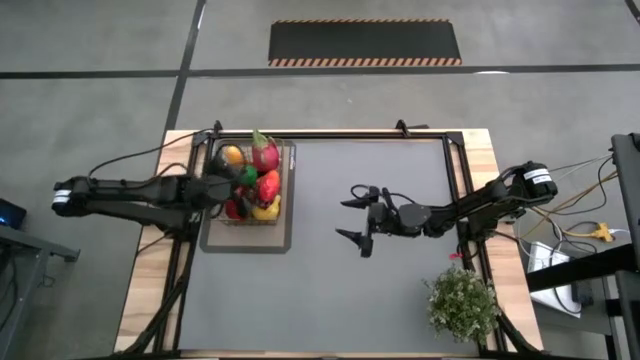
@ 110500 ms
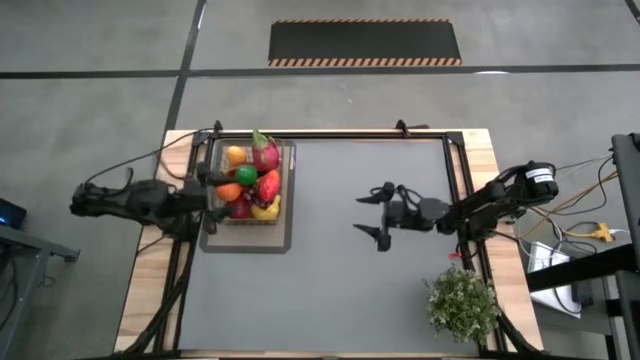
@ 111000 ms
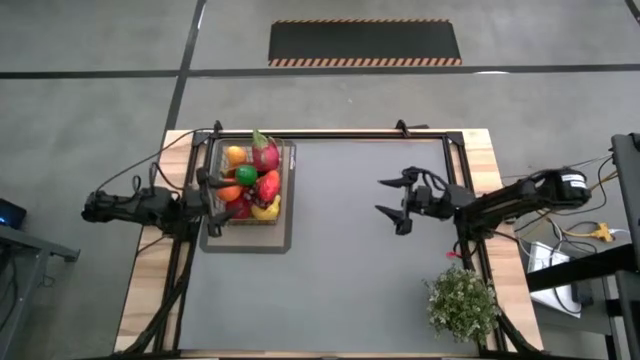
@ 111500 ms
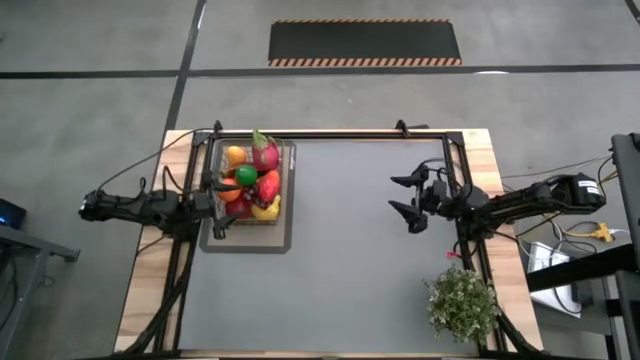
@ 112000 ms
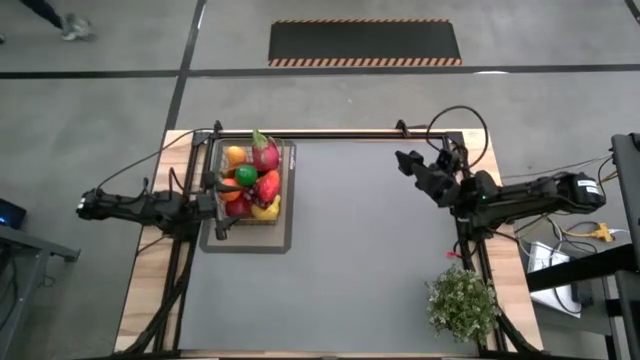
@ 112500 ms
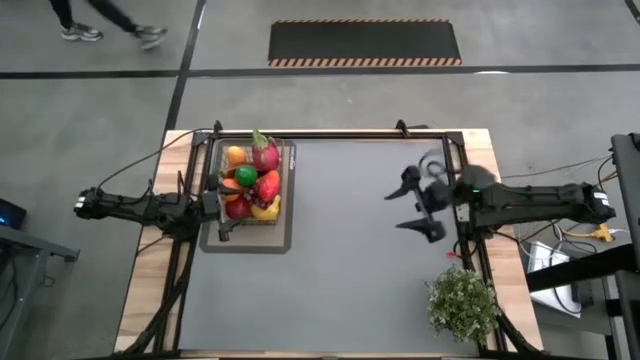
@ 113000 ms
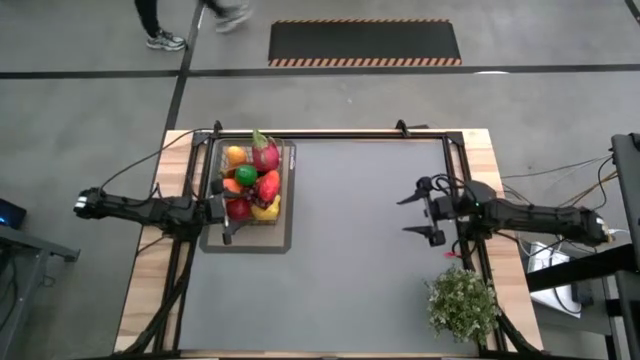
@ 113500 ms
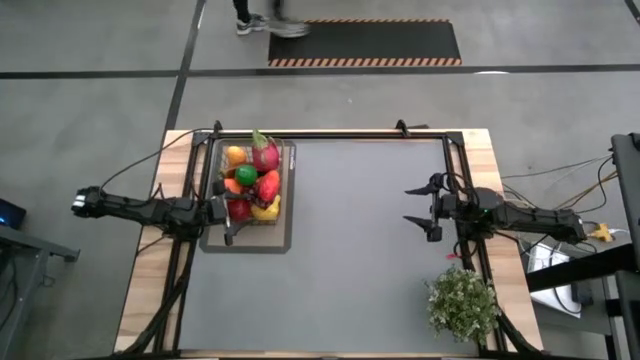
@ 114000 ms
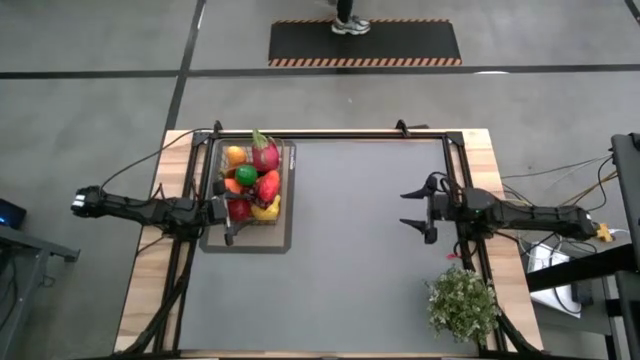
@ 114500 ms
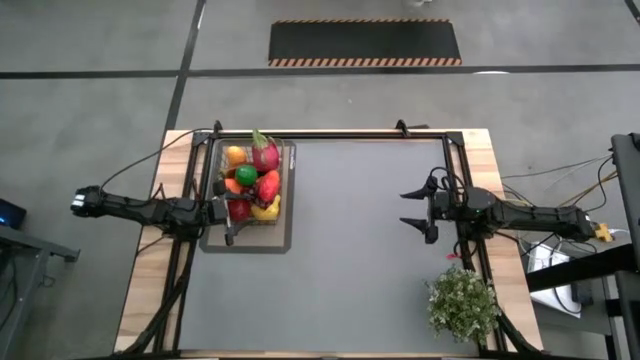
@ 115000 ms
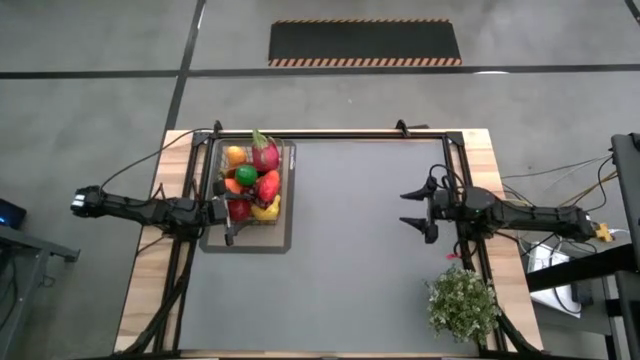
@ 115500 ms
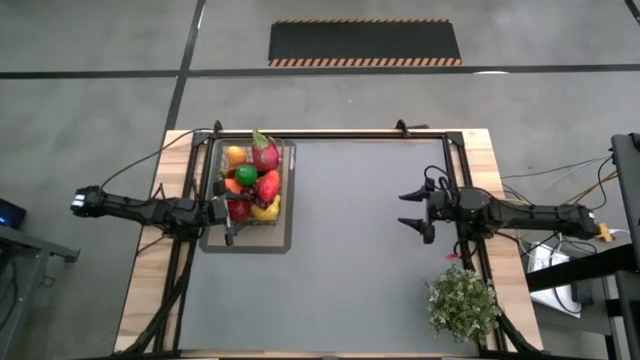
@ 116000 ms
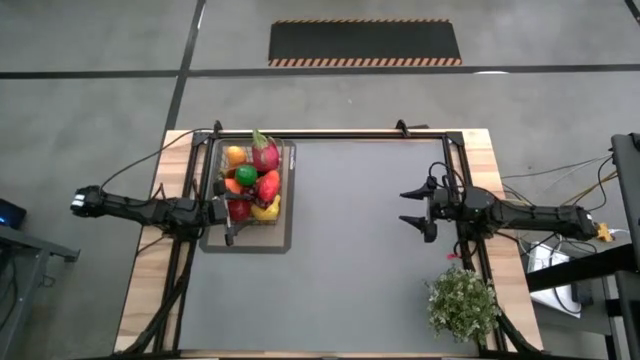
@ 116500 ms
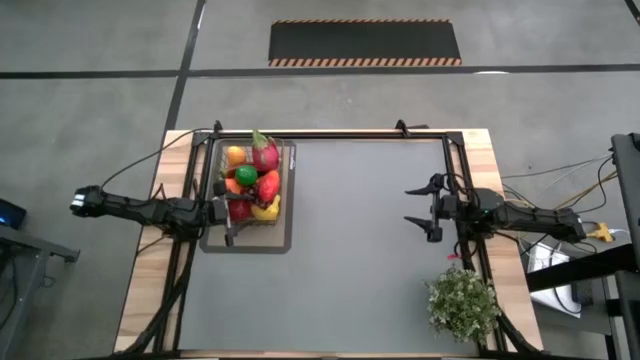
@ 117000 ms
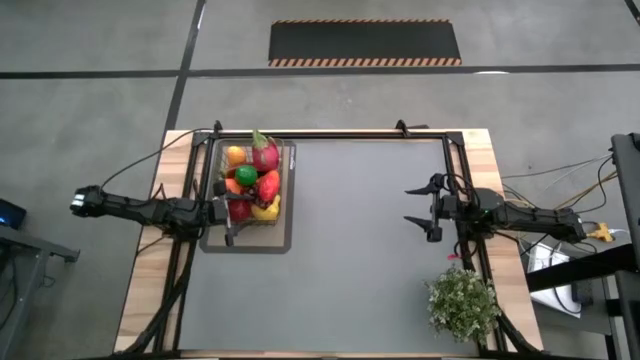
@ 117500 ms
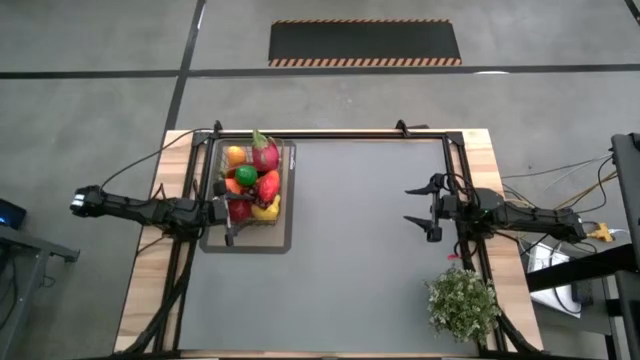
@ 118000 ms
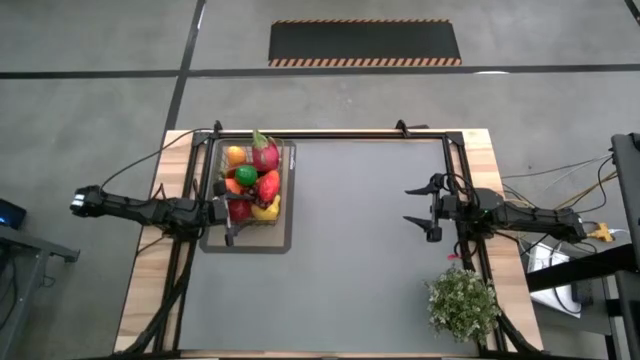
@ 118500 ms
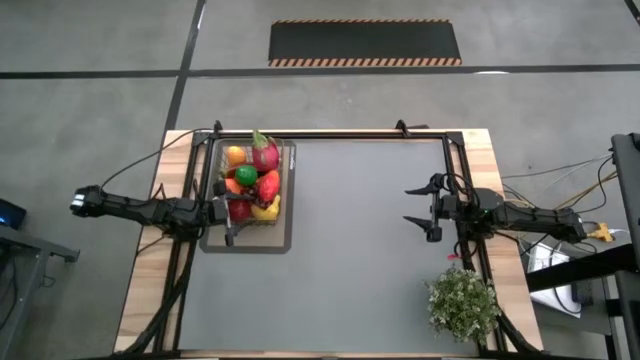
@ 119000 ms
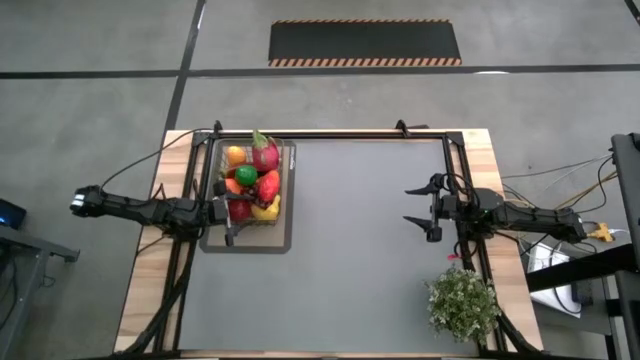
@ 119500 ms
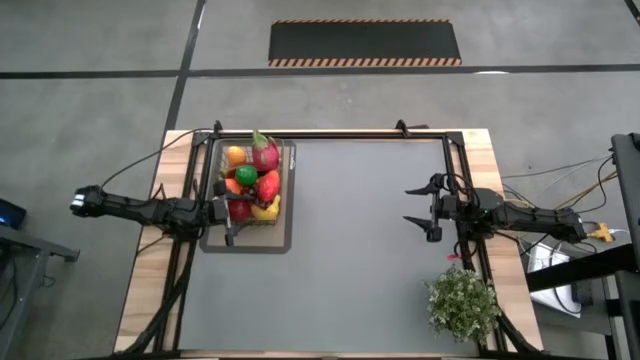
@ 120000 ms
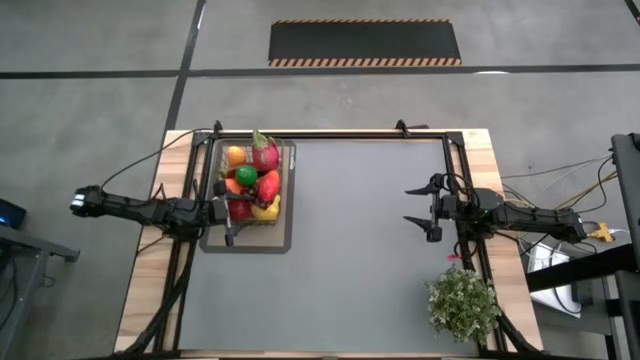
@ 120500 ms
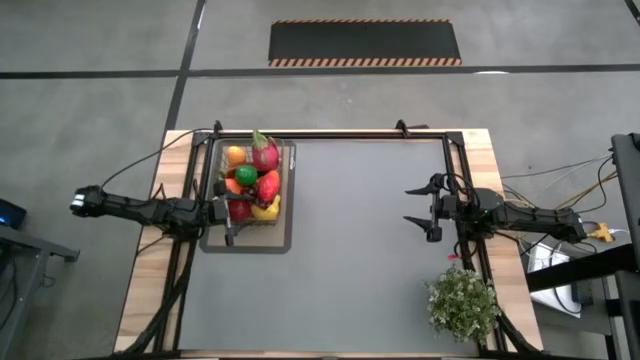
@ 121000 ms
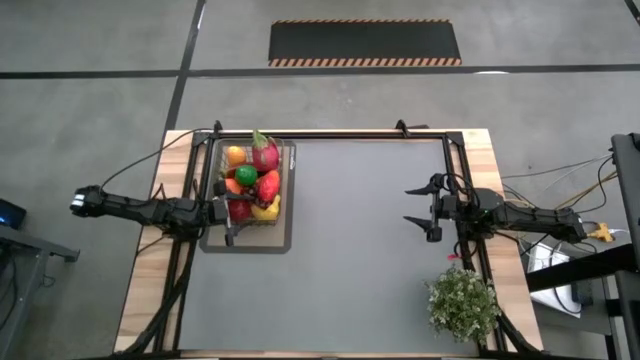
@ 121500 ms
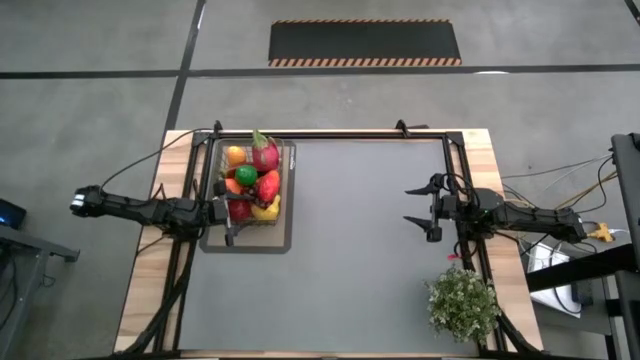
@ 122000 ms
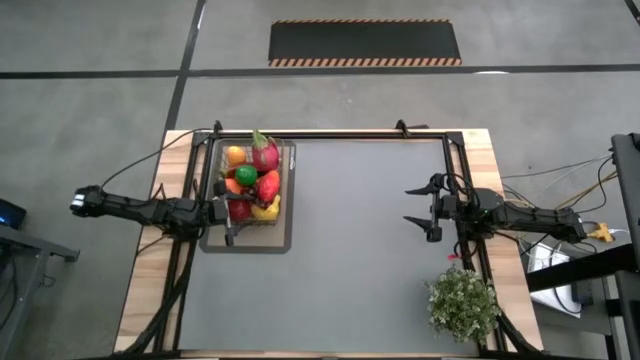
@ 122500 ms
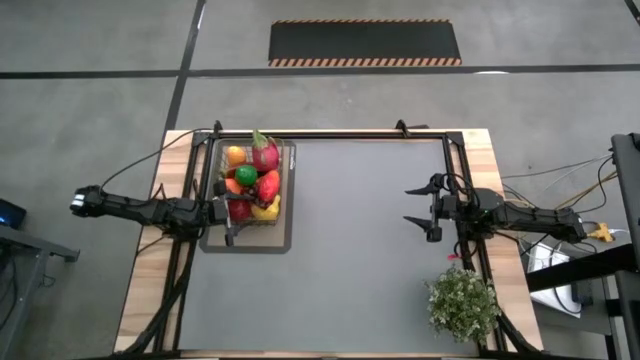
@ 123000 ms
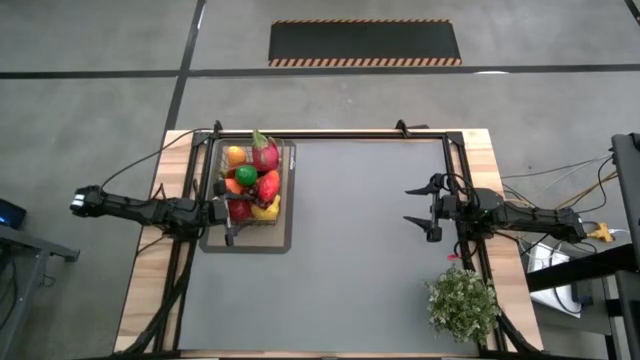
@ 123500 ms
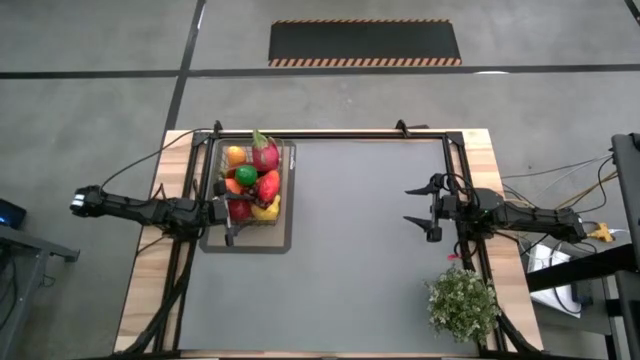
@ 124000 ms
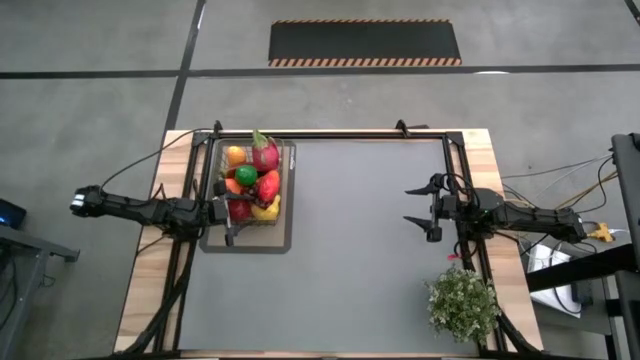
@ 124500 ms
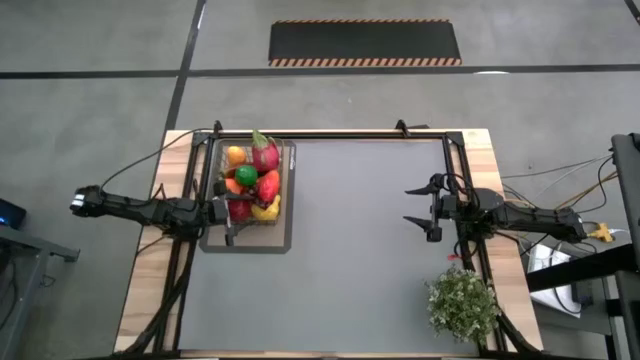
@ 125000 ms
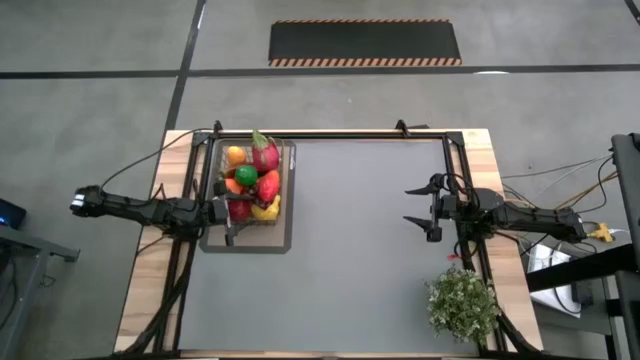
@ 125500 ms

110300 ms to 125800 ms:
Task: Build produce basket
Return to Home Position

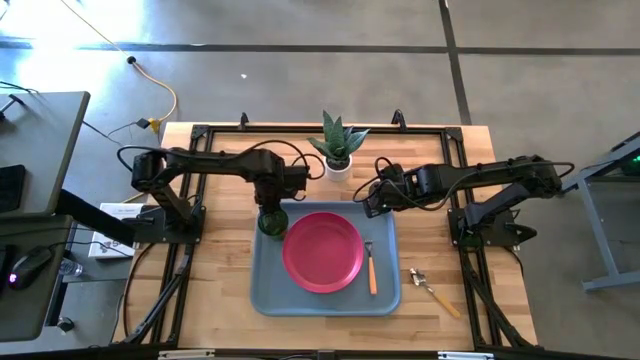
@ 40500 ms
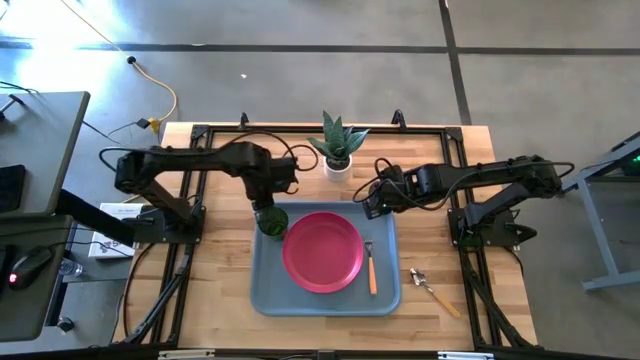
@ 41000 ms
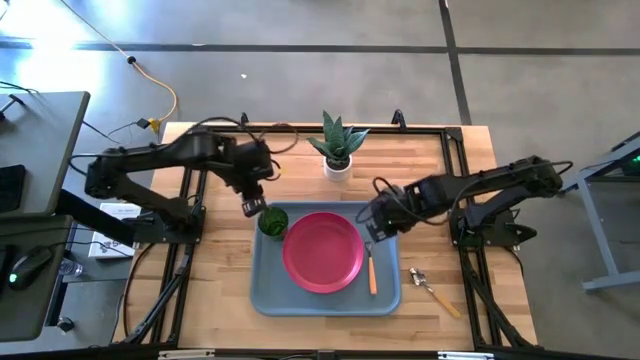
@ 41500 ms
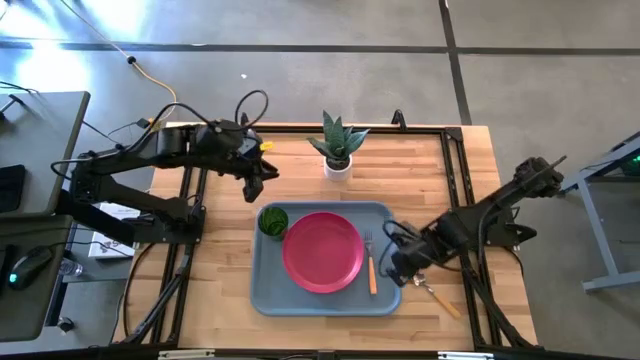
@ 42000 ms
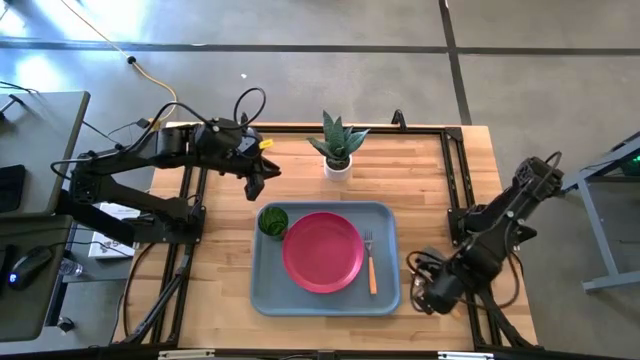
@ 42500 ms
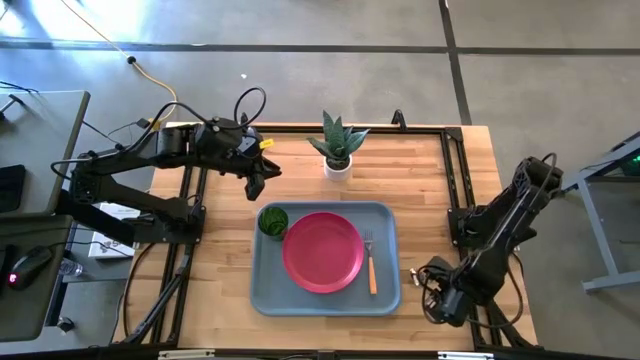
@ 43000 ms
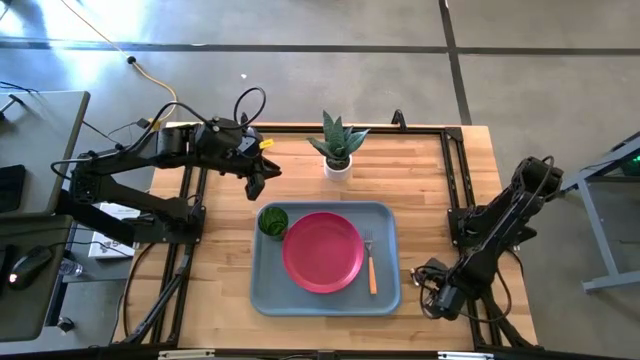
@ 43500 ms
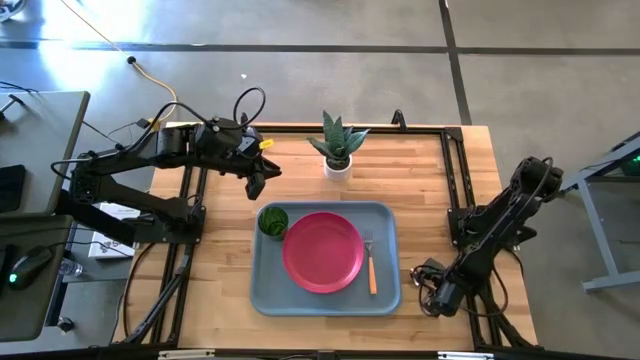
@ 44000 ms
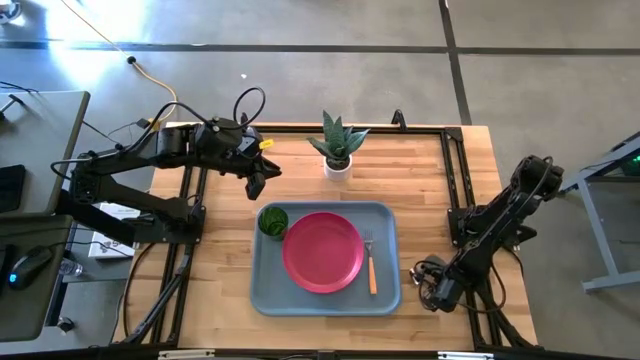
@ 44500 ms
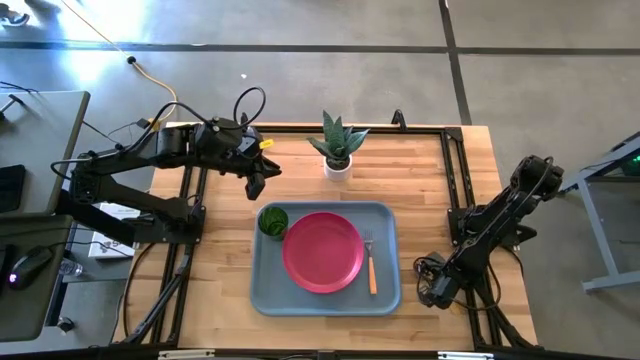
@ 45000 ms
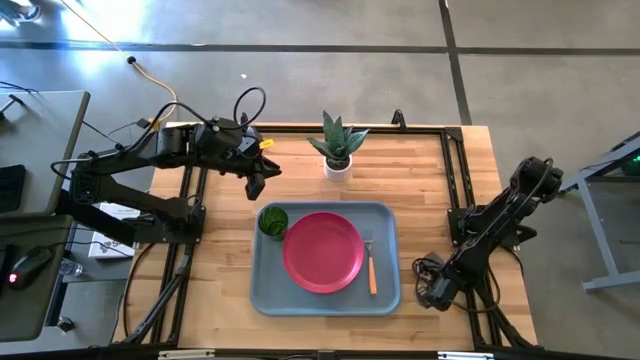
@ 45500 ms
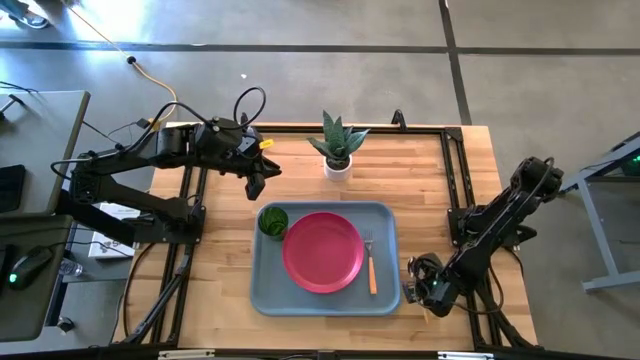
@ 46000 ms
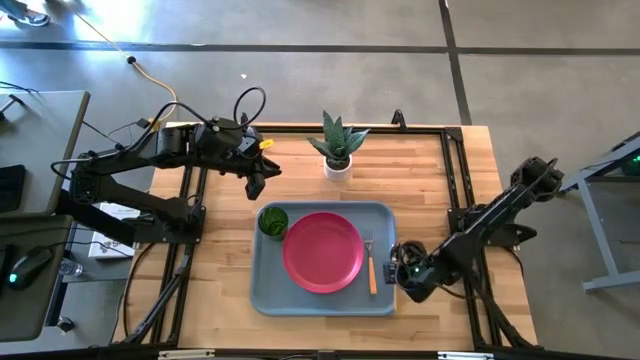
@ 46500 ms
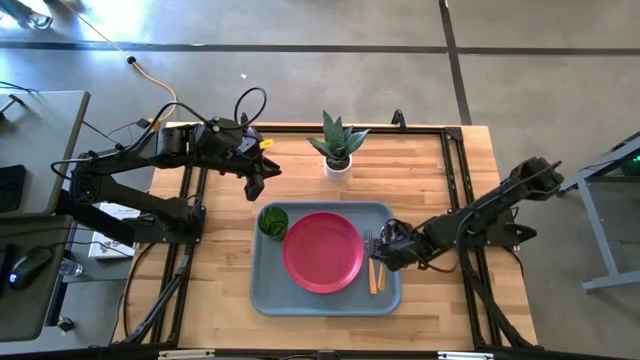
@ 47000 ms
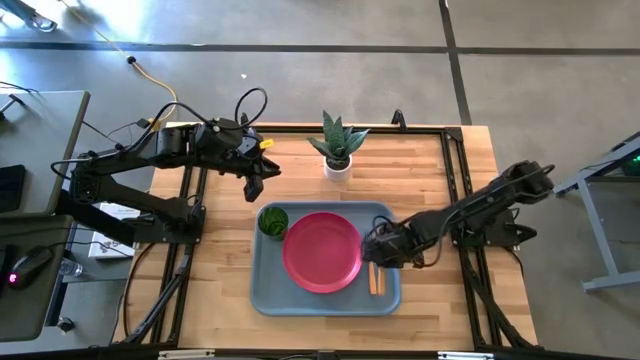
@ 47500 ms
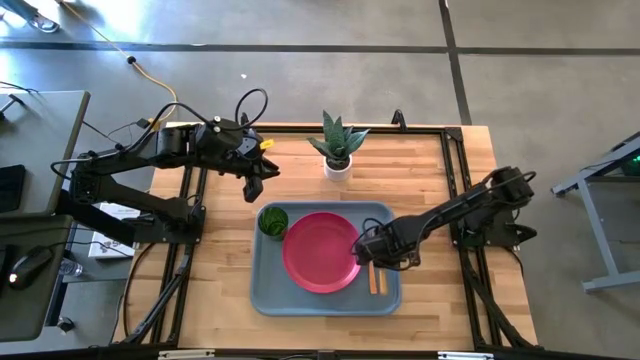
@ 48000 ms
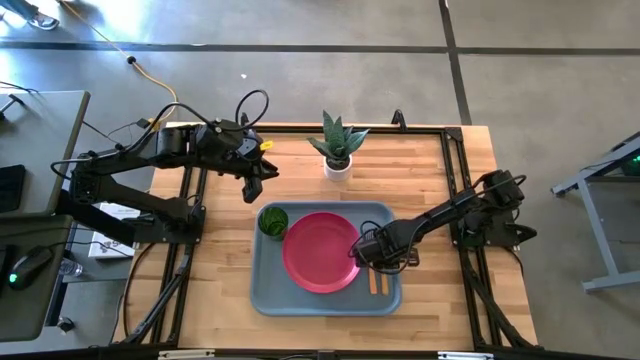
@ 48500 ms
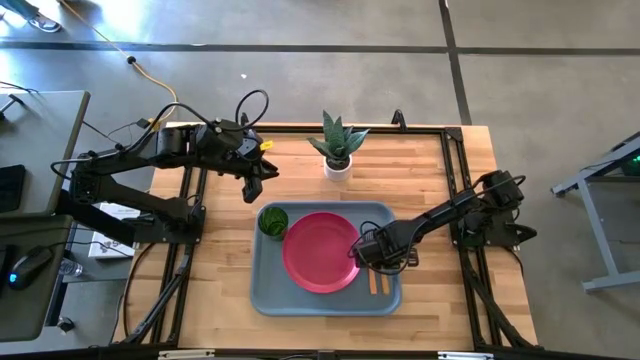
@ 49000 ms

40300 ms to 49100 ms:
Task: Pick and place plate/cup/fork/spoon on tray
Put the orange spoon on the light blue tray beside the orange fork
